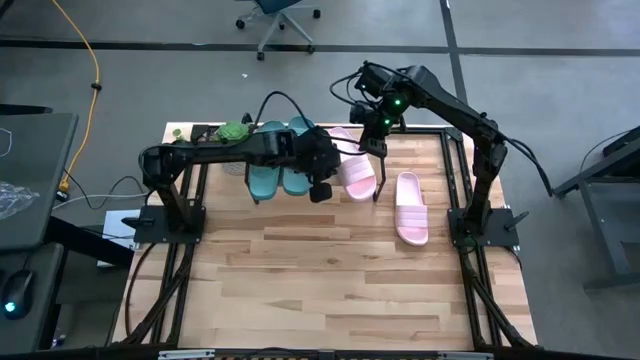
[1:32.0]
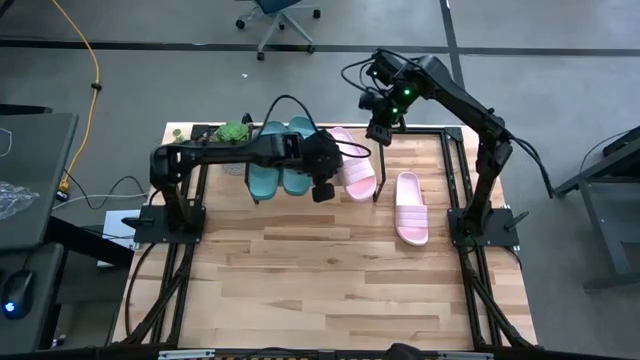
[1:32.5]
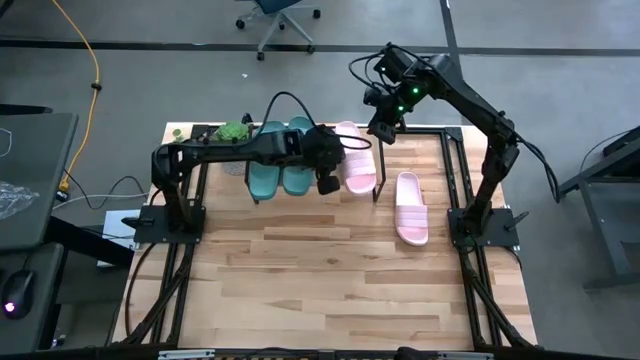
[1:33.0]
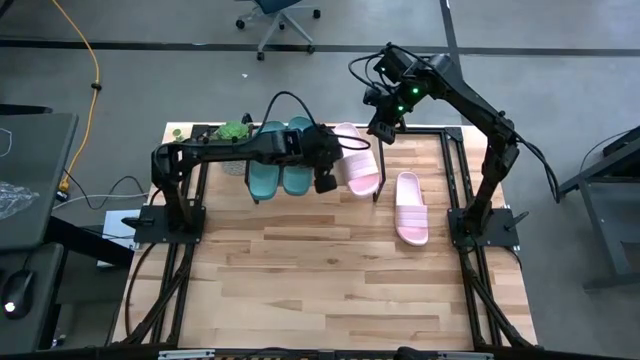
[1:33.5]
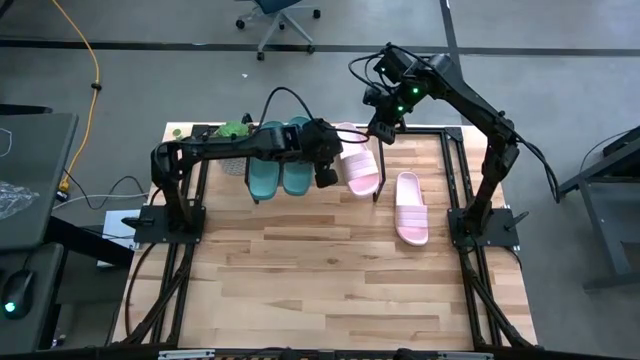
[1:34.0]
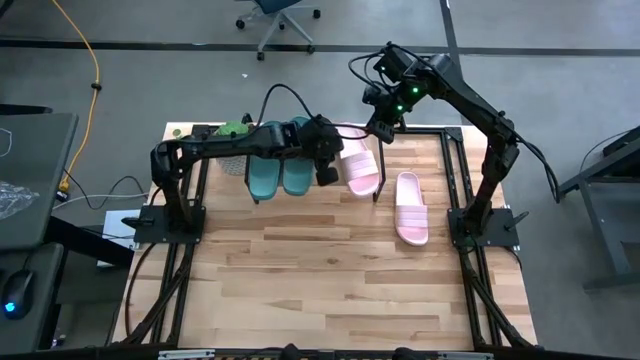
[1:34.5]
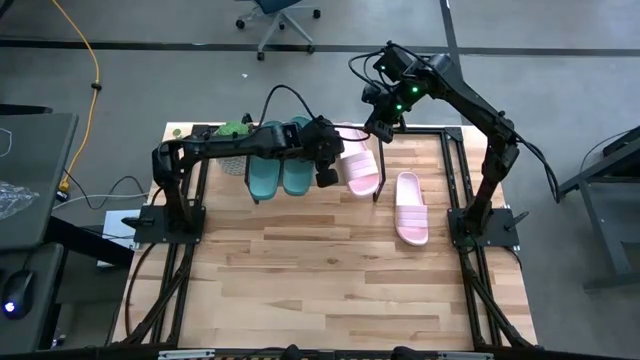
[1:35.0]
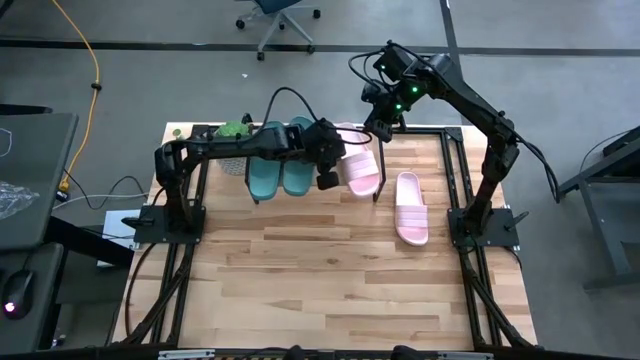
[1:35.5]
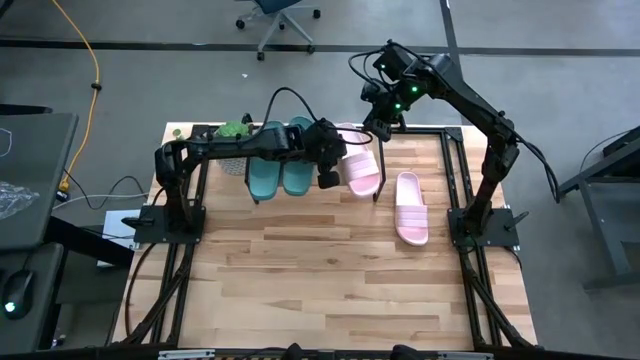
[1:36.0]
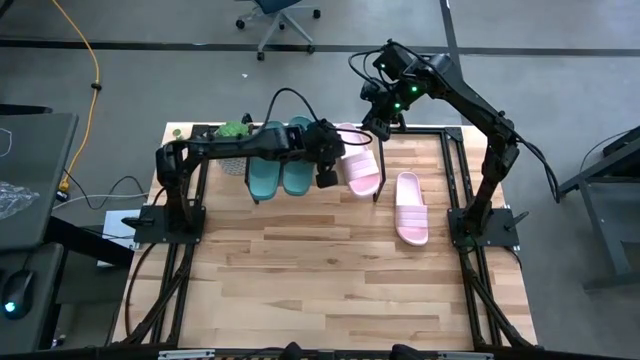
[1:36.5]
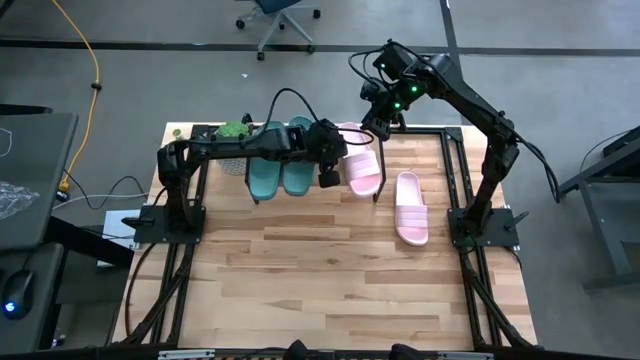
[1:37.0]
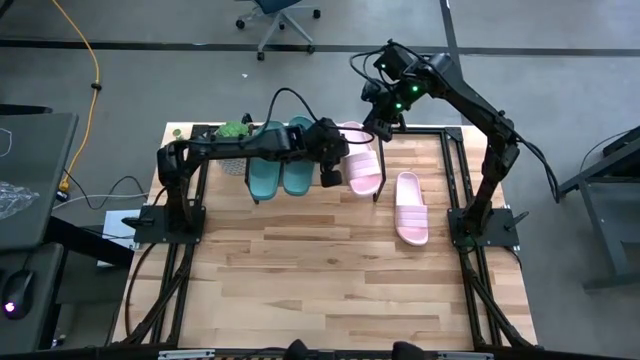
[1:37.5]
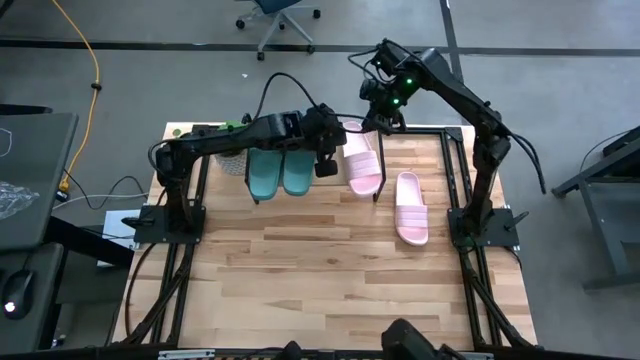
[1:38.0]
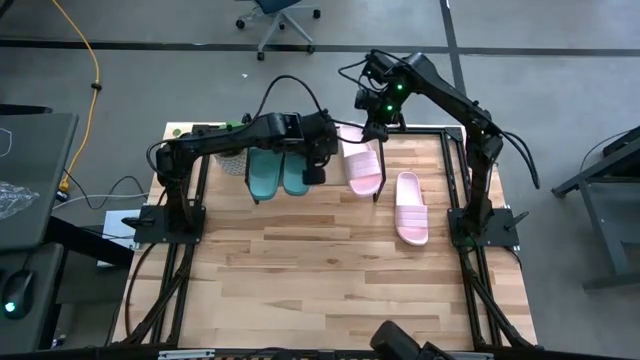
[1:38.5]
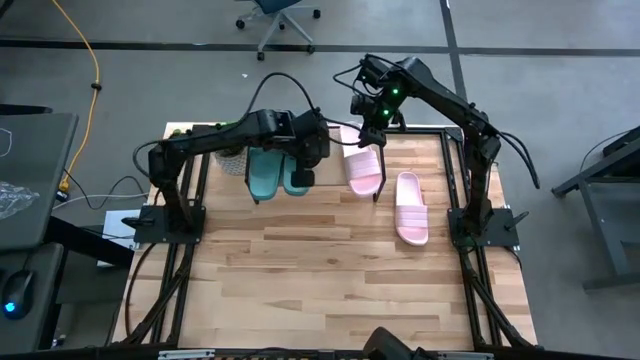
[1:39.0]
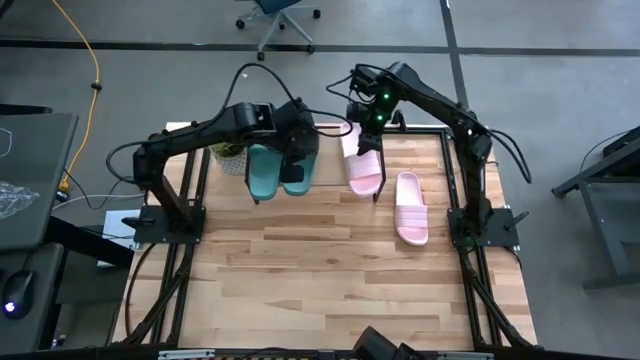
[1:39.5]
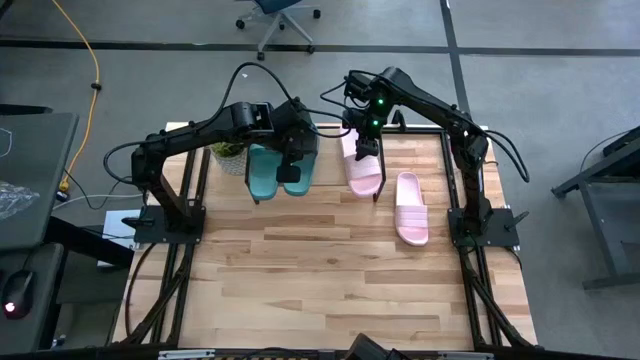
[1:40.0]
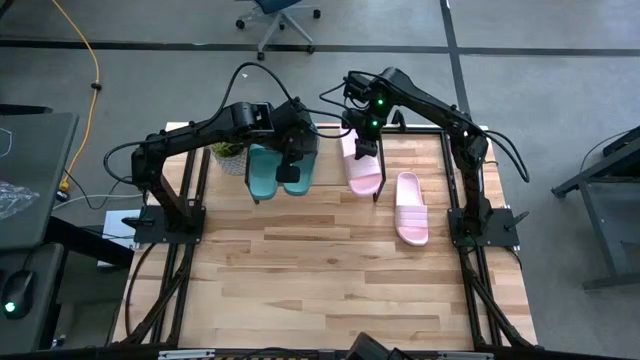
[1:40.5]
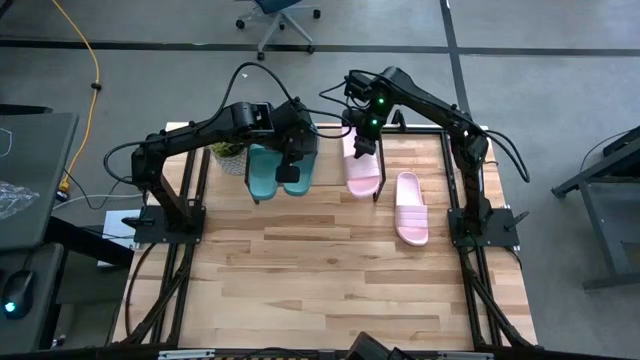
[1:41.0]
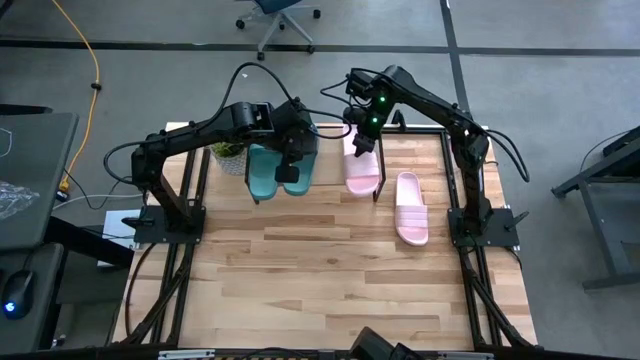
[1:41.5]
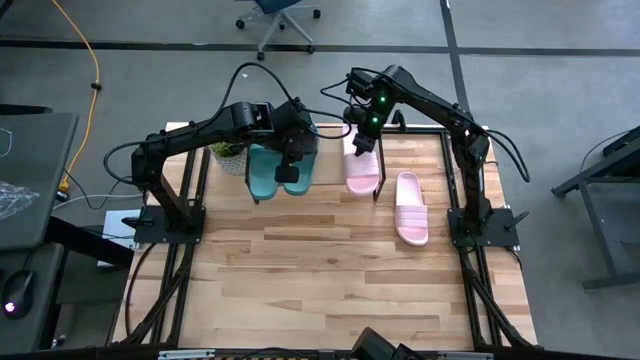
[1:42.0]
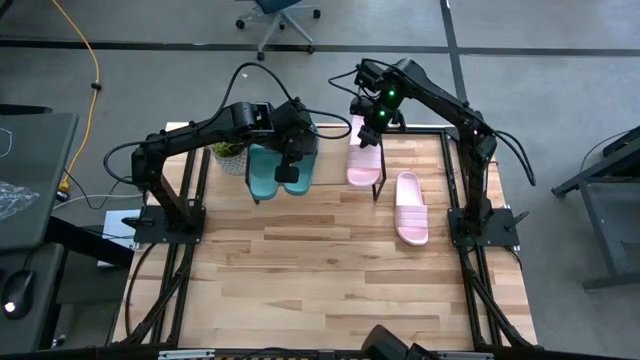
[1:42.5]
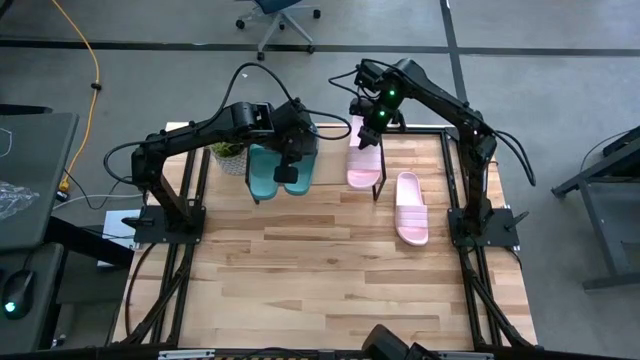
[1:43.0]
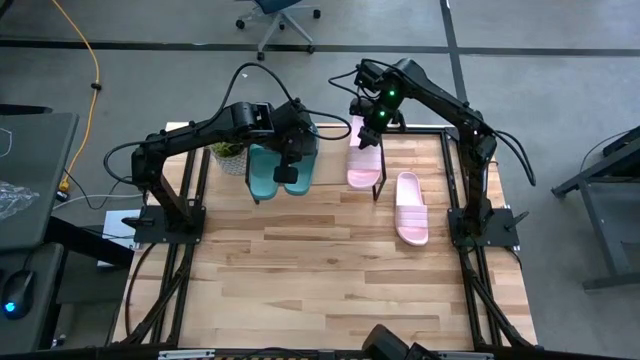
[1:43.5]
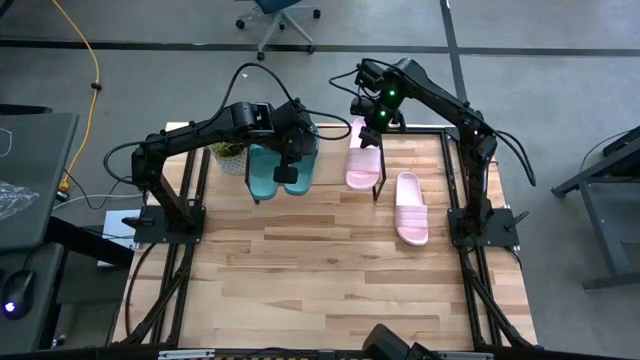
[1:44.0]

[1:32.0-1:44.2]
Task: Pick and place slides into the shelf
Adjust the pink slide on the shelf
